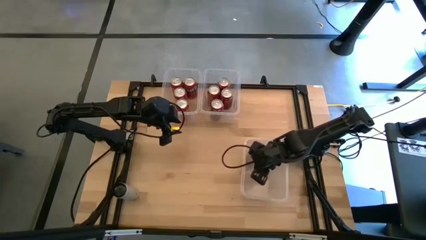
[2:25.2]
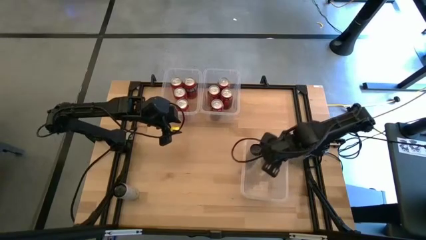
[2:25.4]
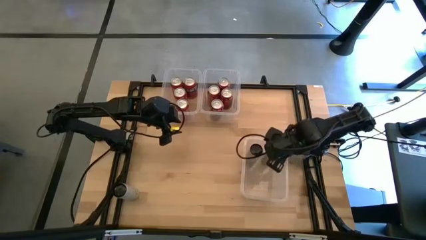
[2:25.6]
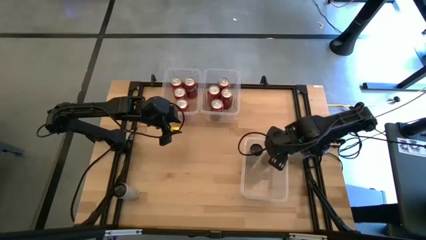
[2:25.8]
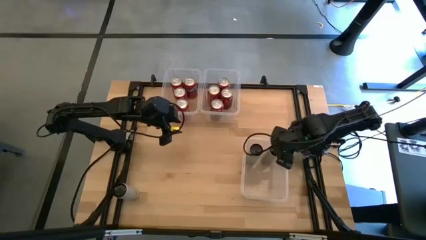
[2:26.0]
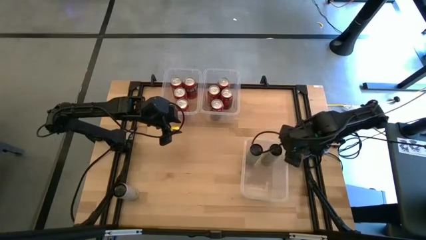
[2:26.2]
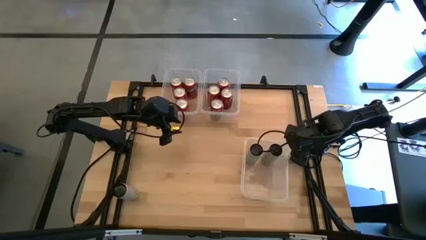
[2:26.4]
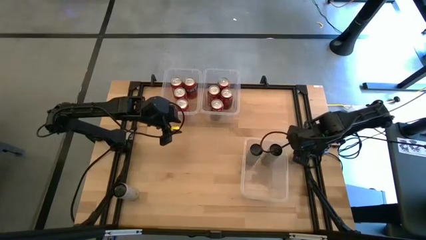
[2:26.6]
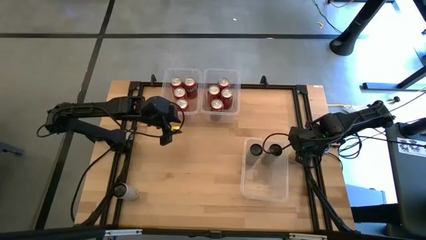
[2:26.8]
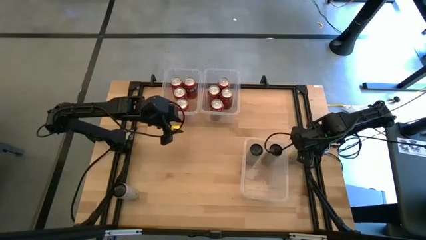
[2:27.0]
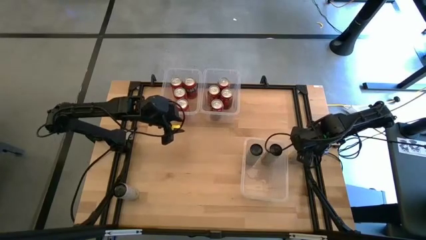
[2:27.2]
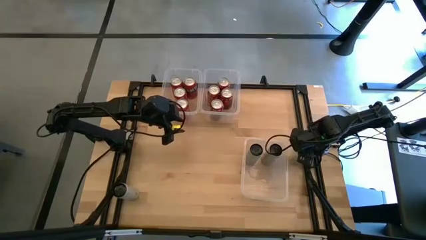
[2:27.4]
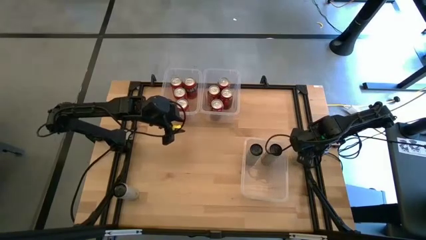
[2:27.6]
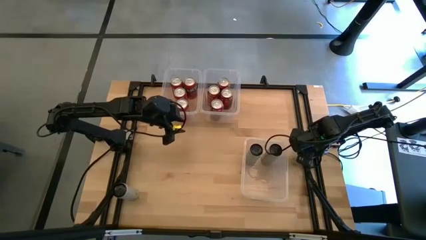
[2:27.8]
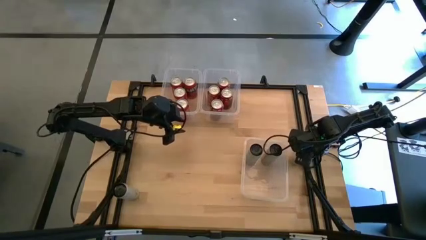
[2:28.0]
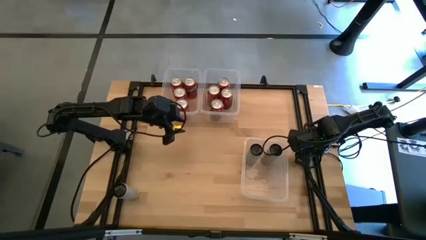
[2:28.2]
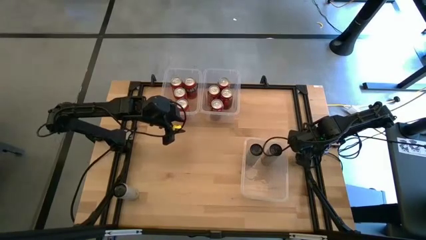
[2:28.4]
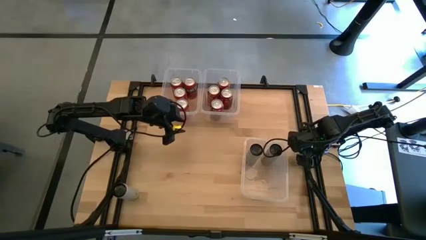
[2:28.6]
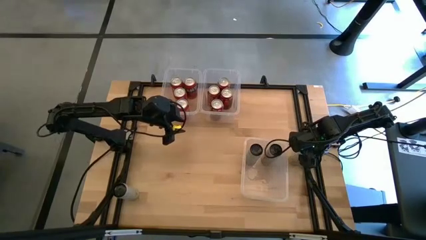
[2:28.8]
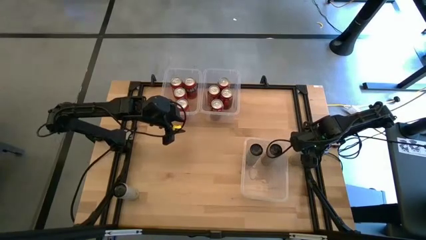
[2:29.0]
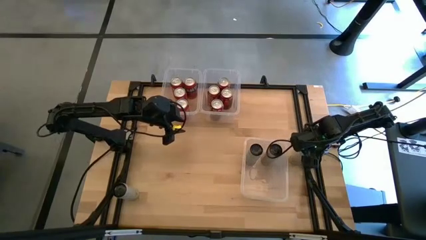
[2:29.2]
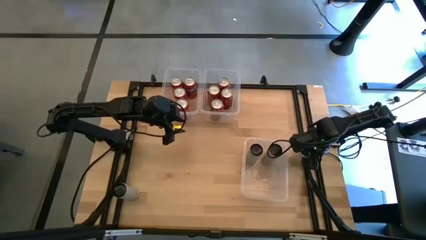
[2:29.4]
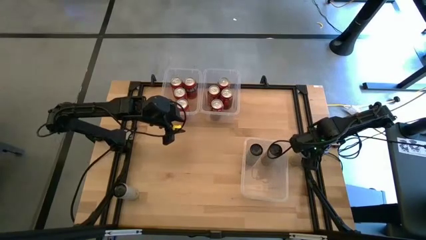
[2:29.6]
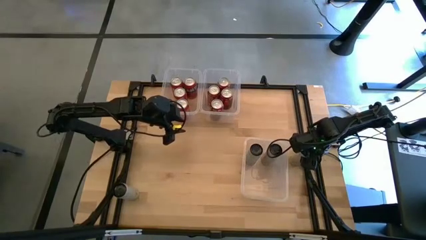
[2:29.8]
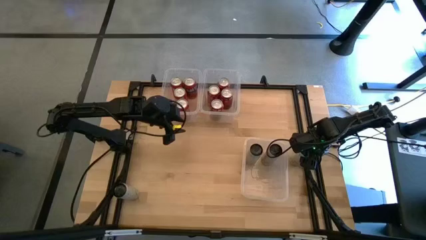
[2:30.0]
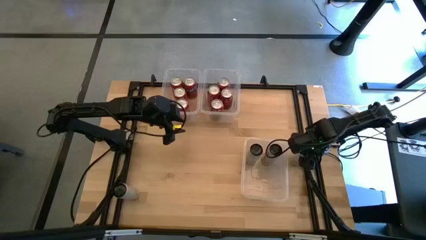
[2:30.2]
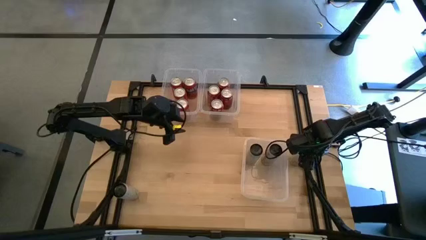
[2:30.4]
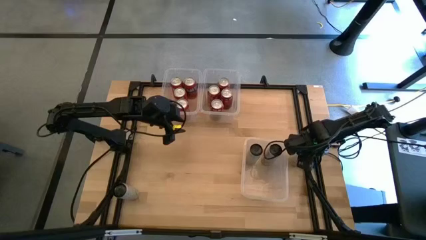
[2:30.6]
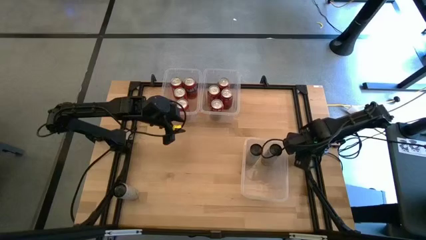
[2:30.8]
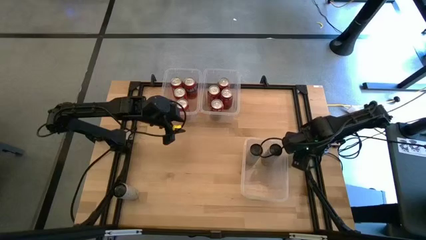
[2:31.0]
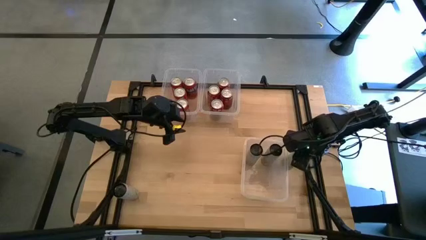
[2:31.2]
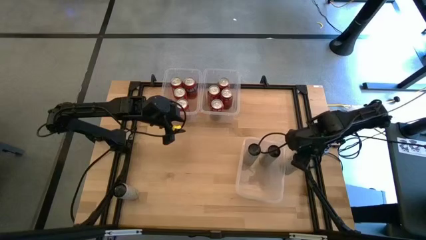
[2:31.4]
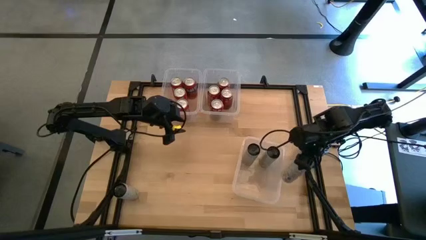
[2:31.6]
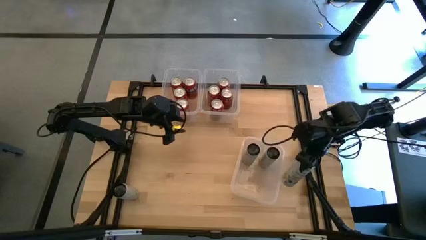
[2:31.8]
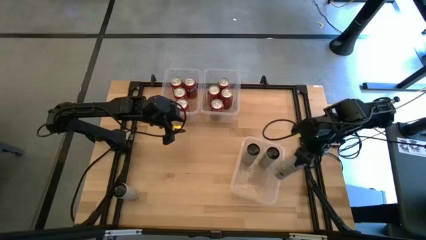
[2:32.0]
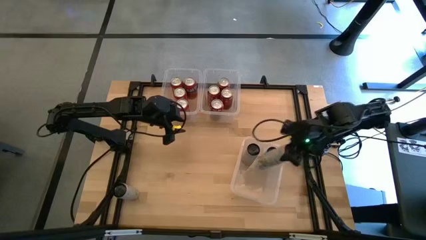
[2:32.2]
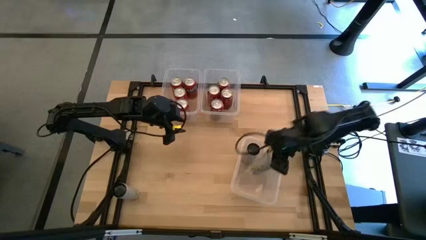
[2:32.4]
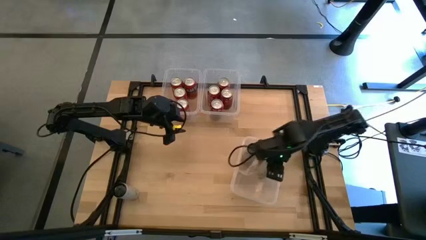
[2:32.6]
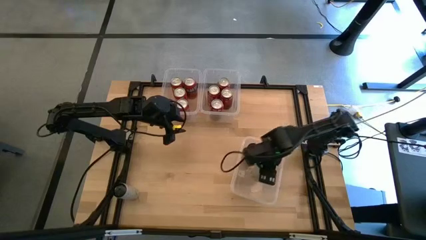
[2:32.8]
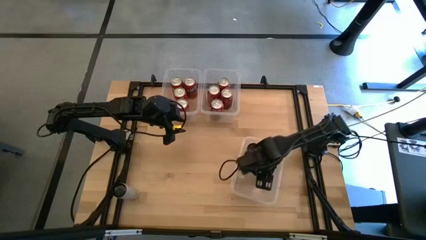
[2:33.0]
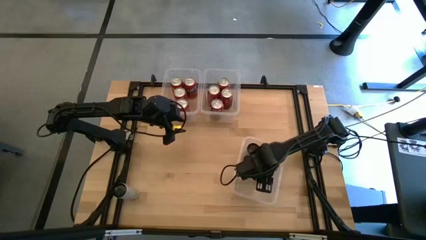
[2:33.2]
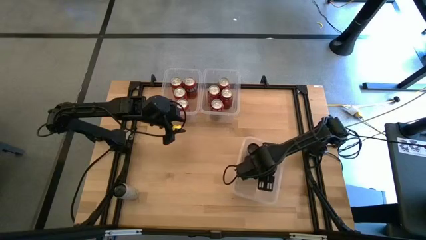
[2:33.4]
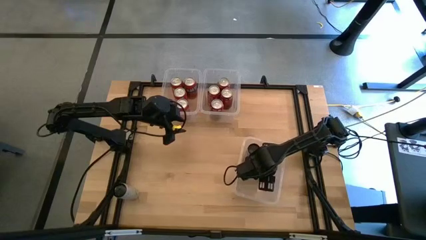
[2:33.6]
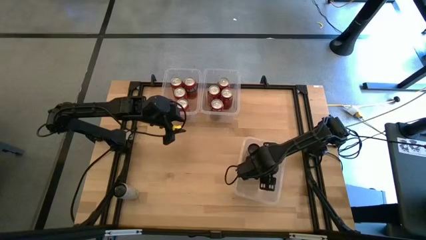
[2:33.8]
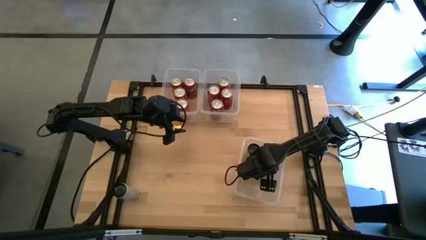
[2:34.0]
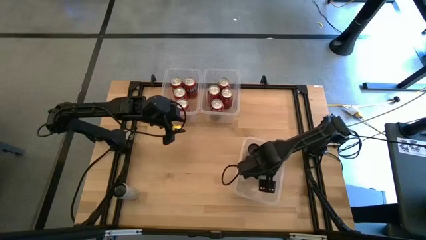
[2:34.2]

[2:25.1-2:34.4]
Task: Sort soda cans
Put the white-yellow soda can into the bottom transparent bin

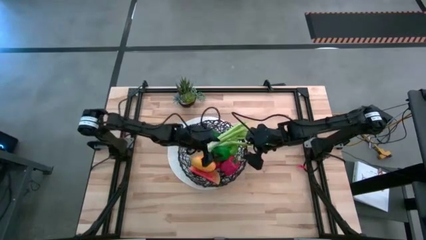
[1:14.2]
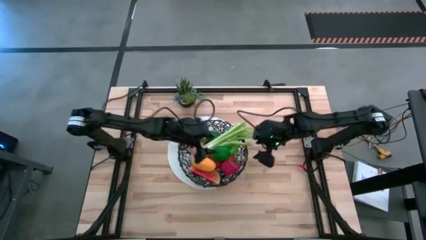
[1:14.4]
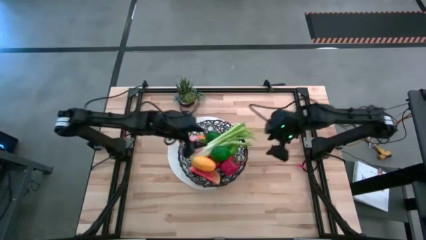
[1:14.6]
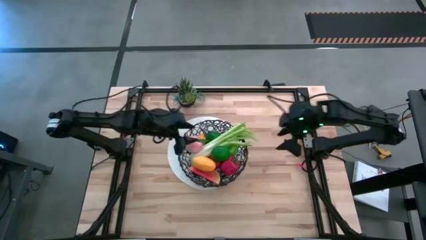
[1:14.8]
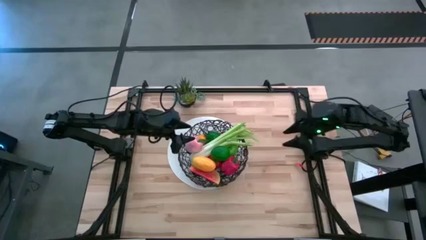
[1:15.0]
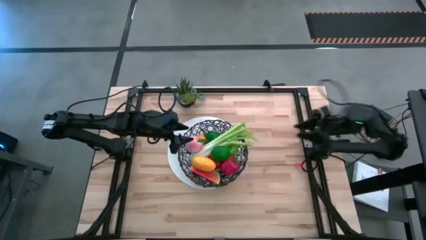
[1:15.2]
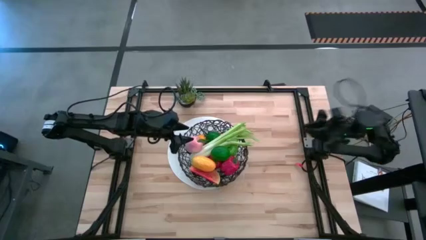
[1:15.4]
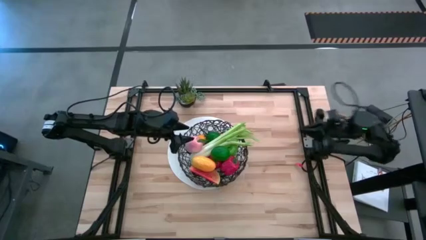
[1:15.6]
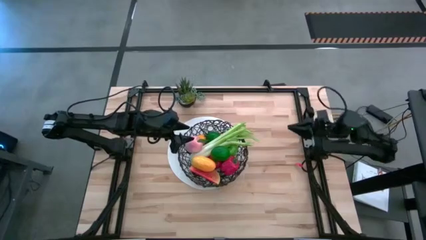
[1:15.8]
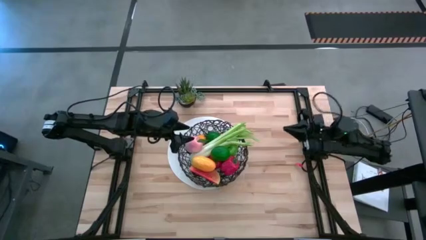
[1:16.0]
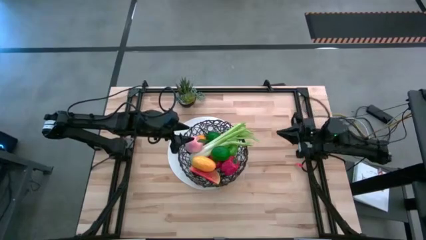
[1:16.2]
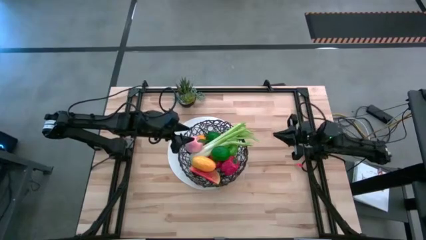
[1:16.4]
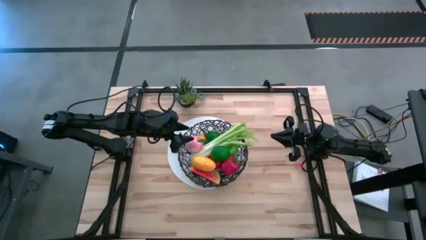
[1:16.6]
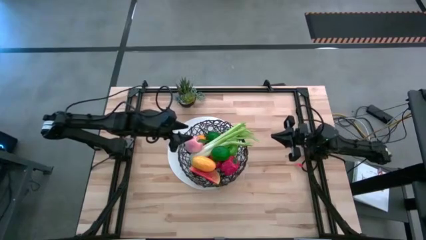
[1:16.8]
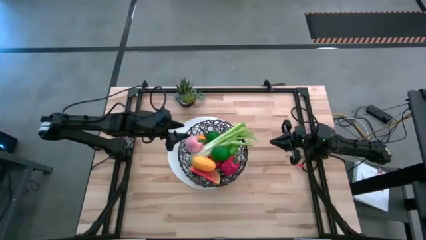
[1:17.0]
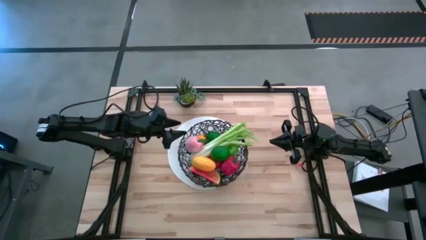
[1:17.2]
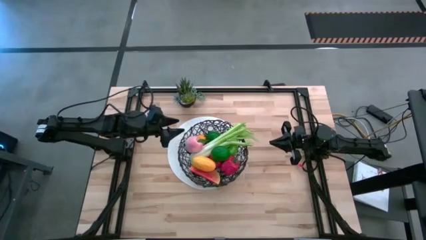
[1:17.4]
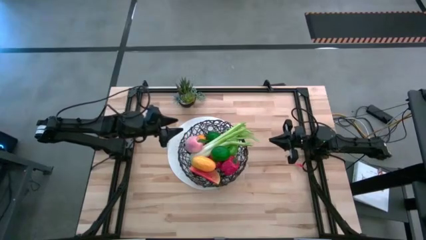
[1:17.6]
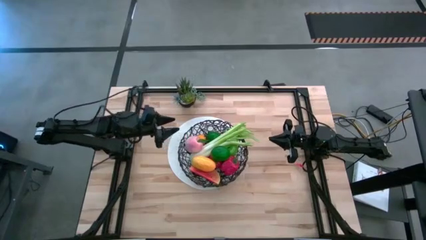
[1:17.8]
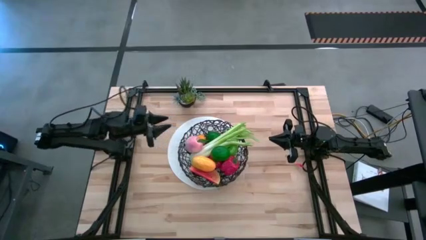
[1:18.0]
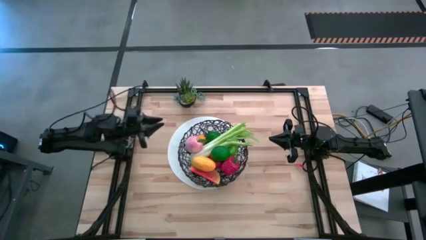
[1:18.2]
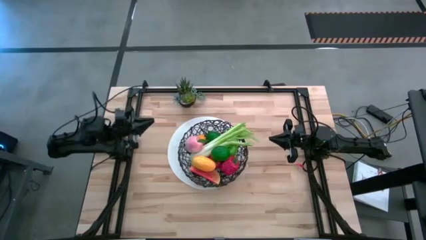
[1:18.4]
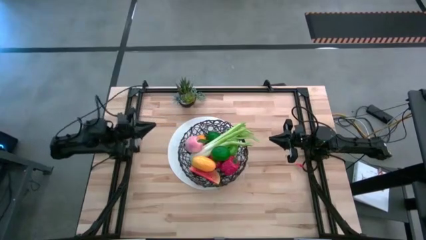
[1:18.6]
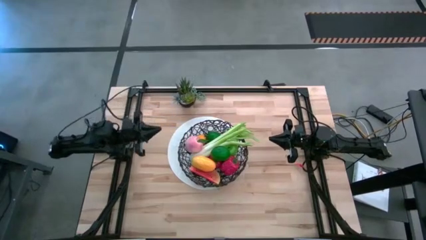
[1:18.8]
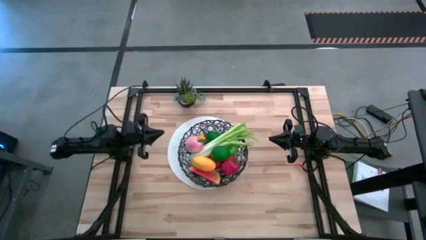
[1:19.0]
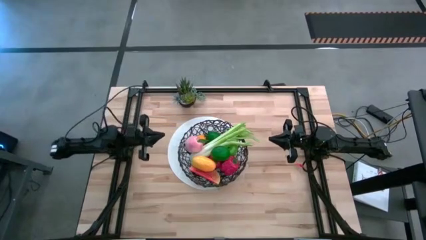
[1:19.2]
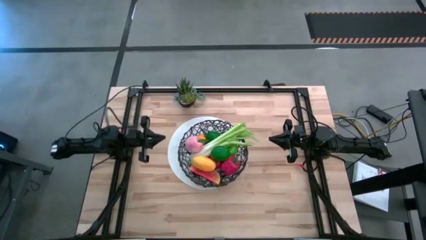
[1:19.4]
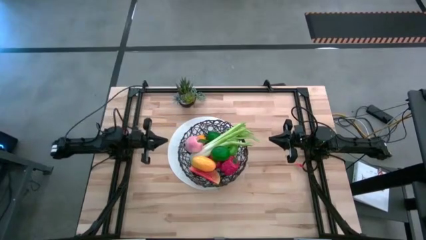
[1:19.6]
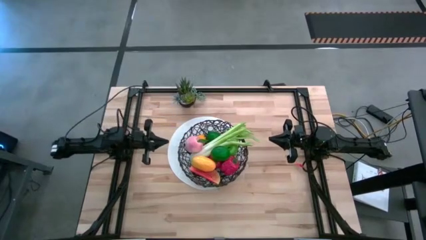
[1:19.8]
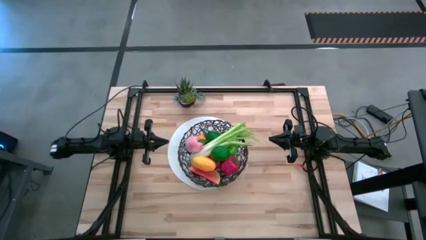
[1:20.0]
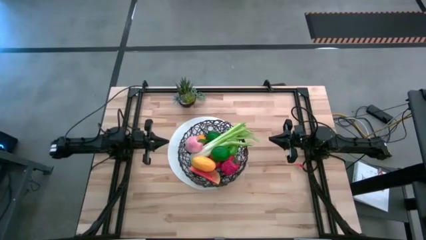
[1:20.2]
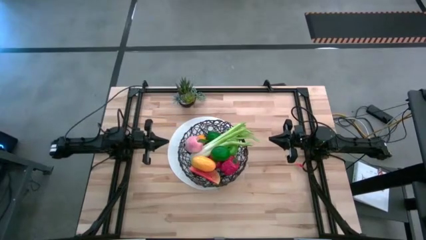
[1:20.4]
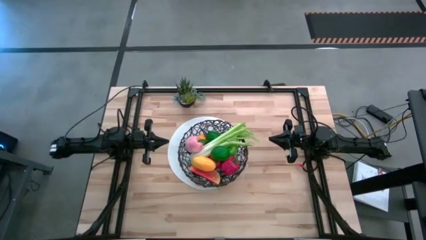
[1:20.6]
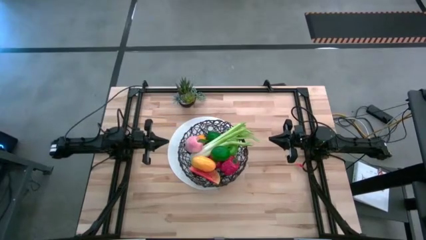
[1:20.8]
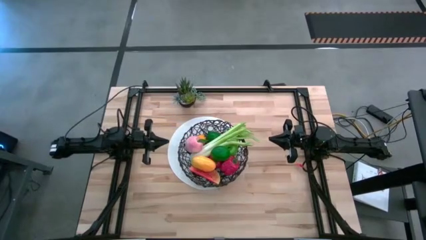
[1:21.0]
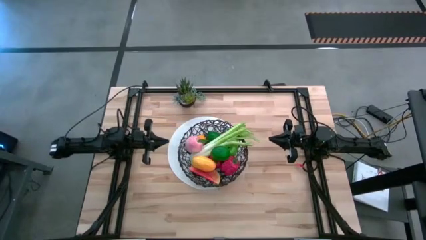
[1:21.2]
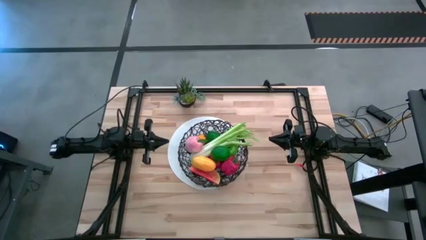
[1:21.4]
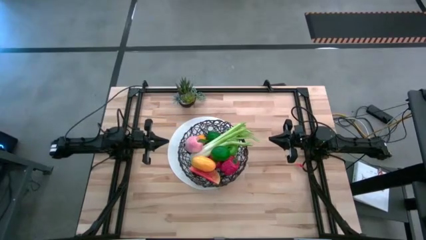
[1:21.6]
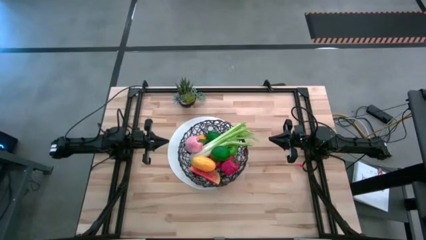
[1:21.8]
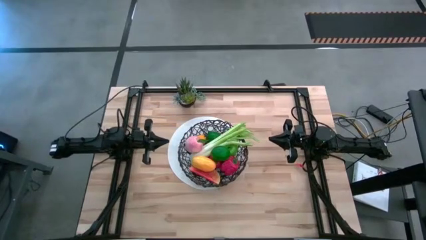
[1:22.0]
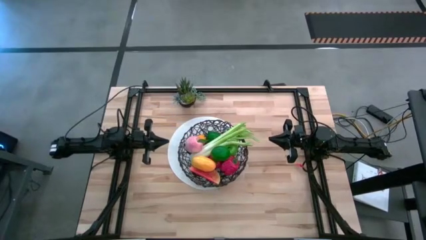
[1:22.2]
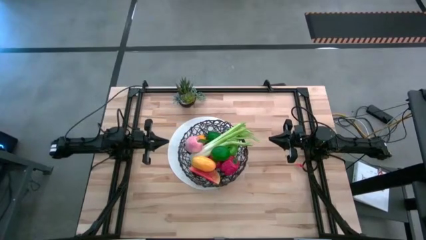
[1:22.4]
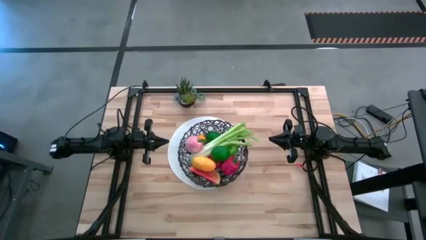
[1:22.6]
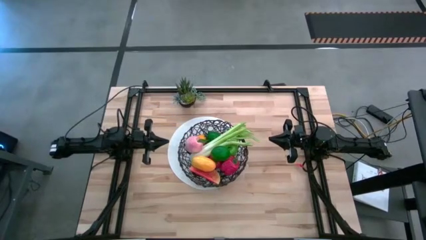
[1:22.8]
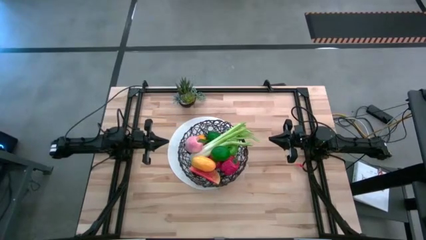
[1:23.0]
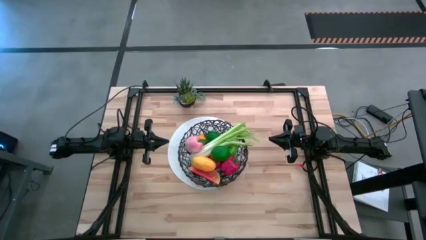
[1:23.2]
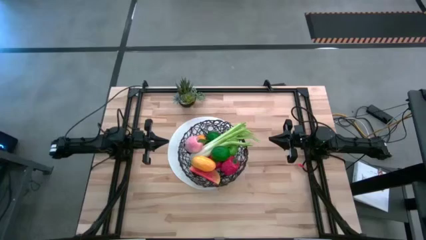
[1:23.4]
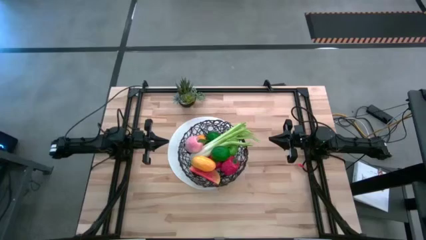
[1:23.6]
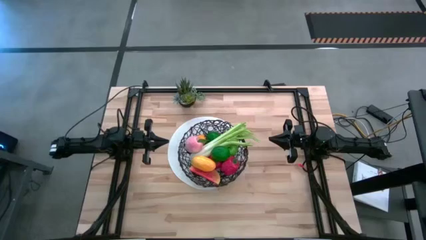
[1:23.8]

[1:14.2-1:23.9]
Task: Build produce basket
Return to Home Position
